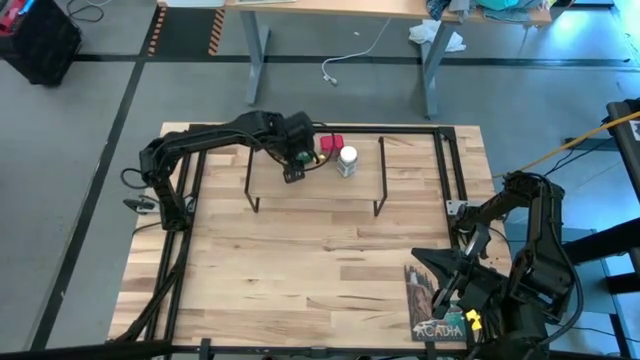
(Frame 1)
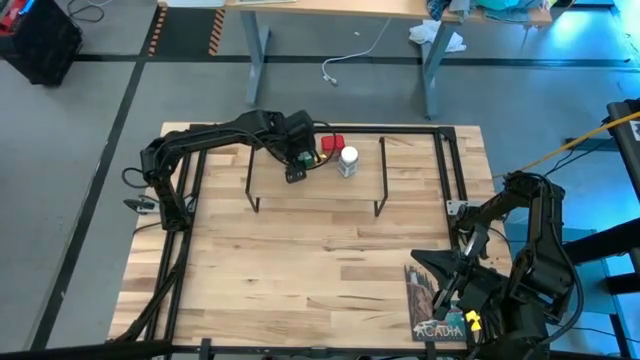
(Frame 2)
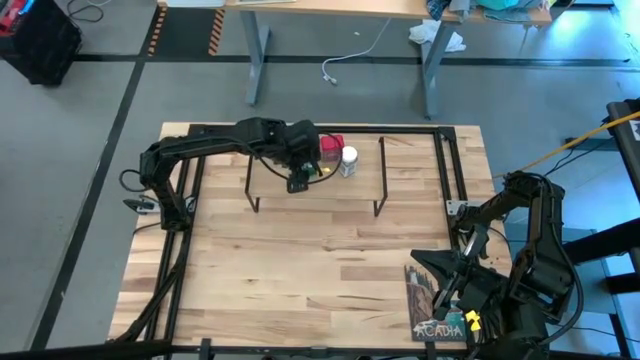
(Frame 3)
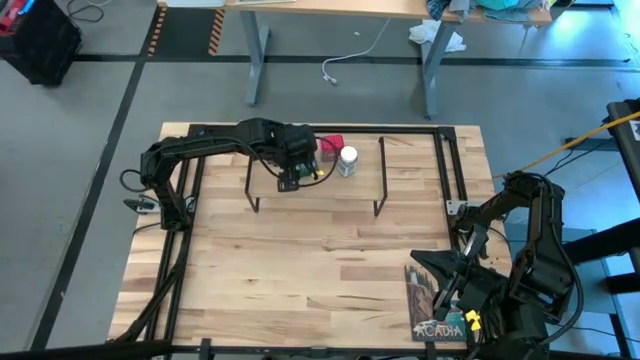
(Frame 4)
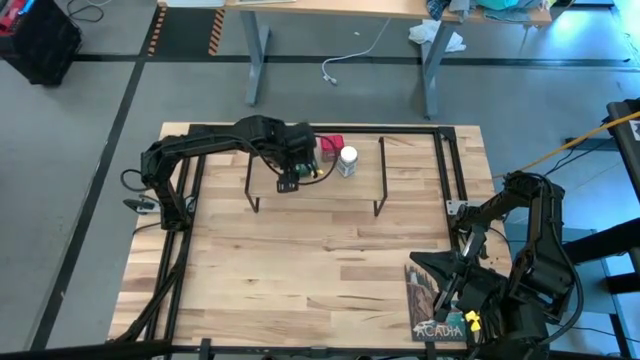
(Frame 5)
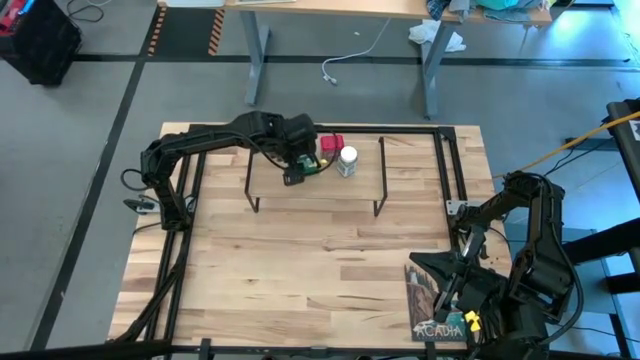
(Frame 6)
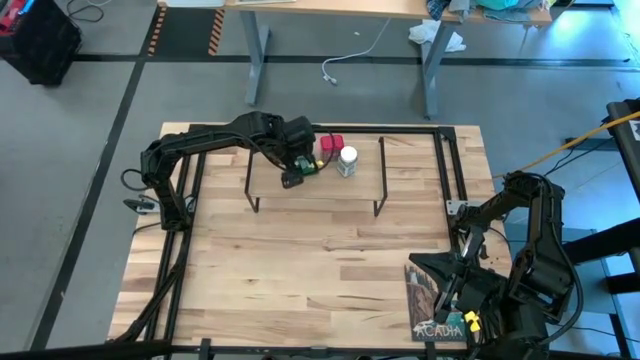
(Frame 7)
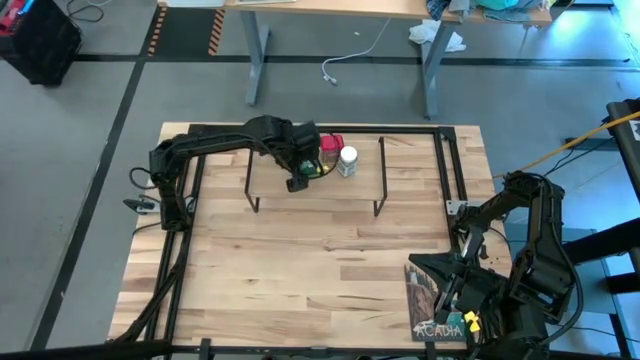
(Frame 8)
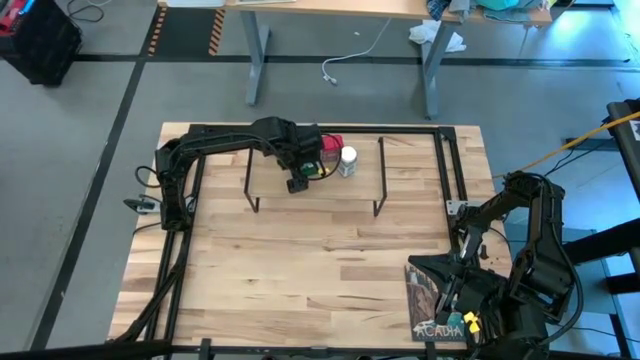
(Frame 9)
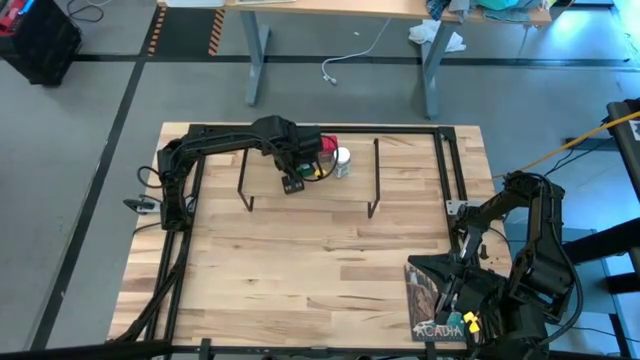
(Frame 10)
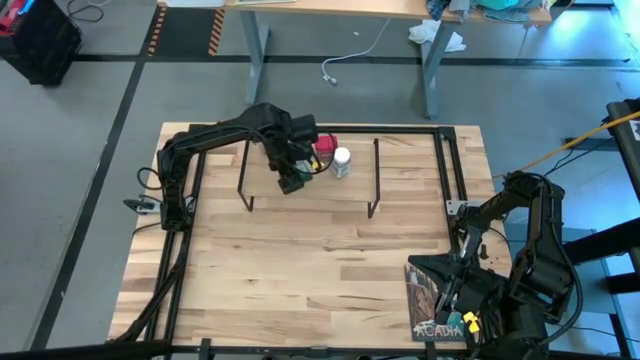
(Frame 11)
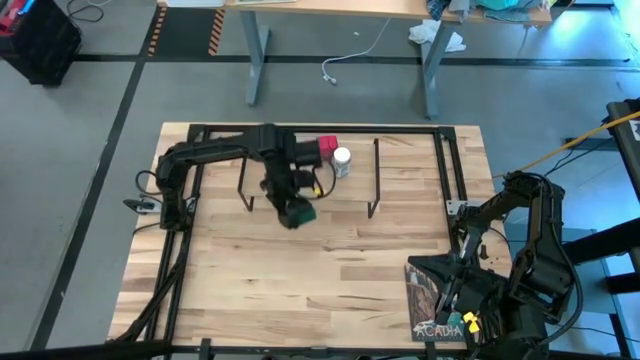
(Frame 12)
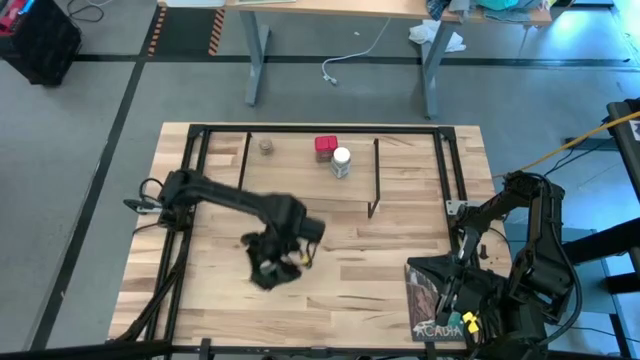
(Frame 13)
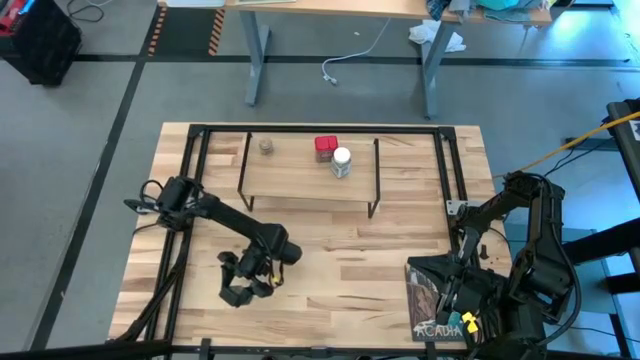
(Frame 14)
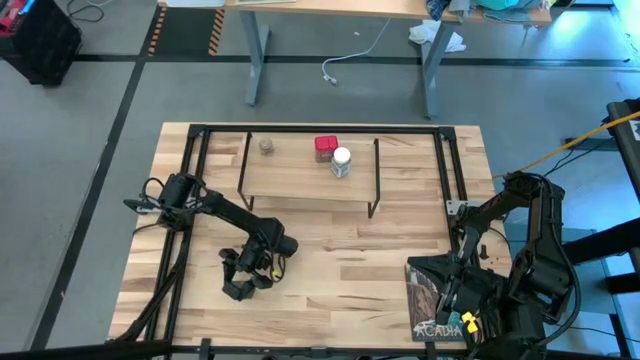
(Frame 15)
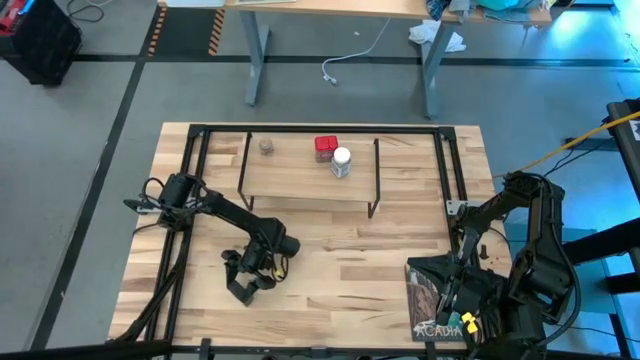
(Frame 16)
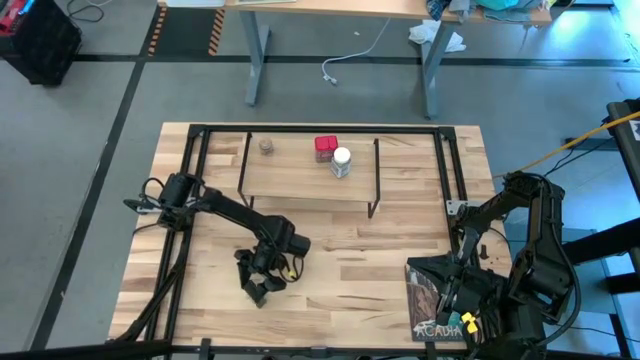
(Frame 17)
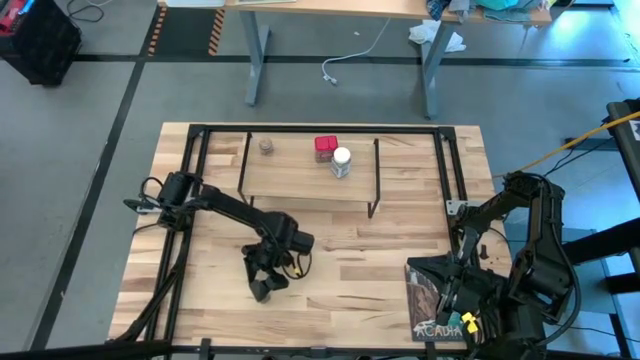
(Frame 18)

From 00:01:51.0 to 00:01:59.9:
Task: Shelf spices
Remove the green seasoning can from the shelf

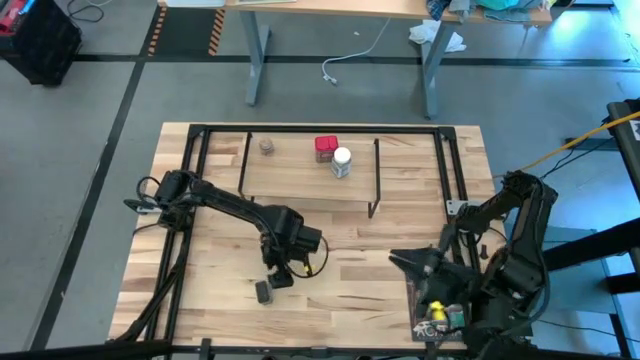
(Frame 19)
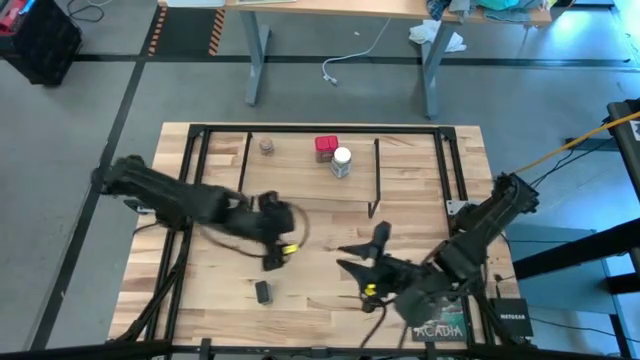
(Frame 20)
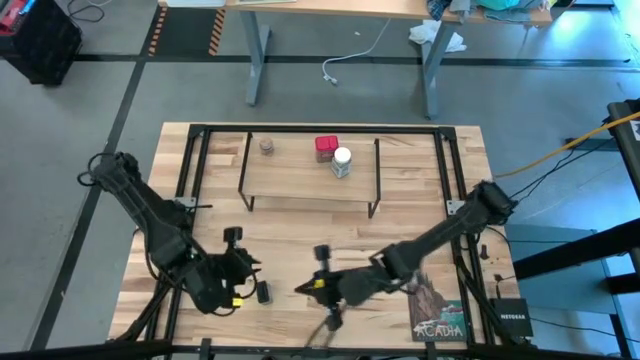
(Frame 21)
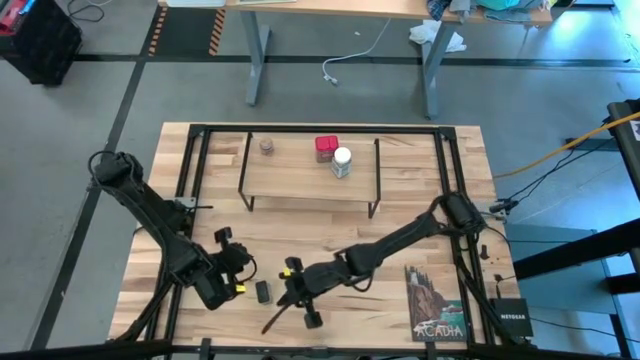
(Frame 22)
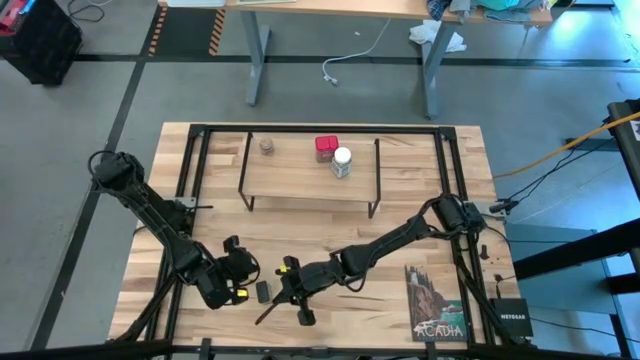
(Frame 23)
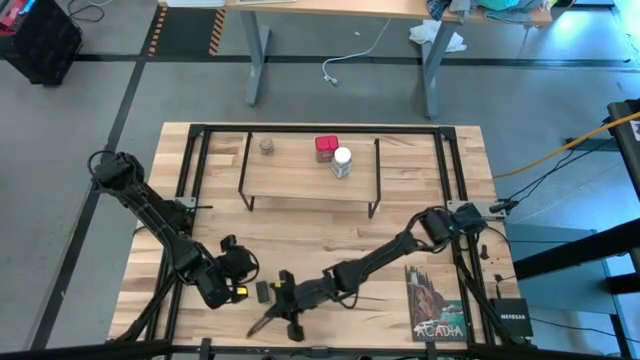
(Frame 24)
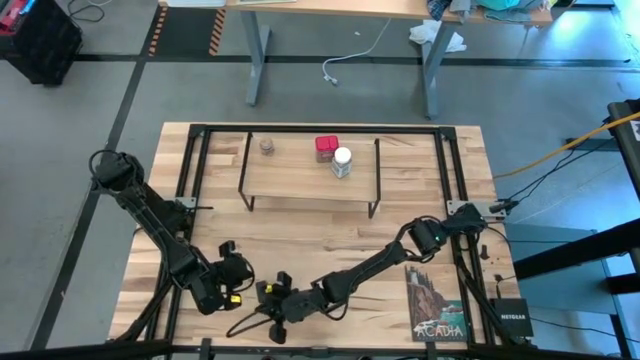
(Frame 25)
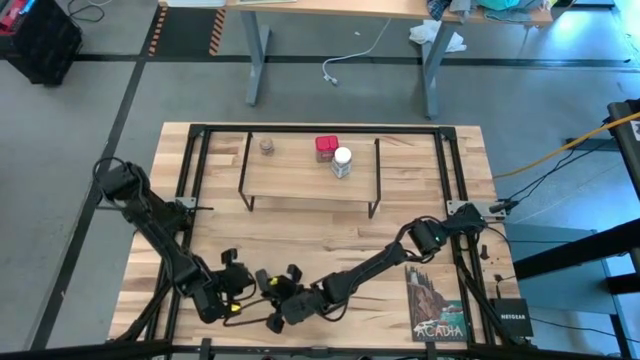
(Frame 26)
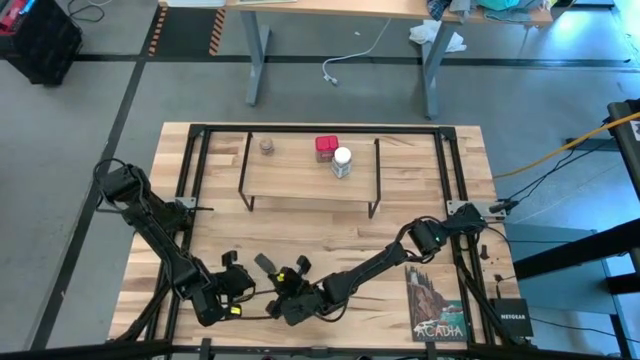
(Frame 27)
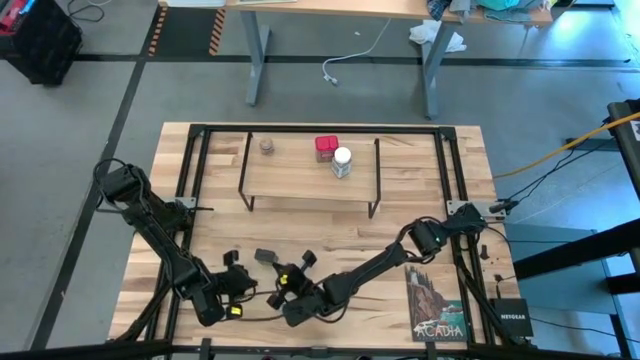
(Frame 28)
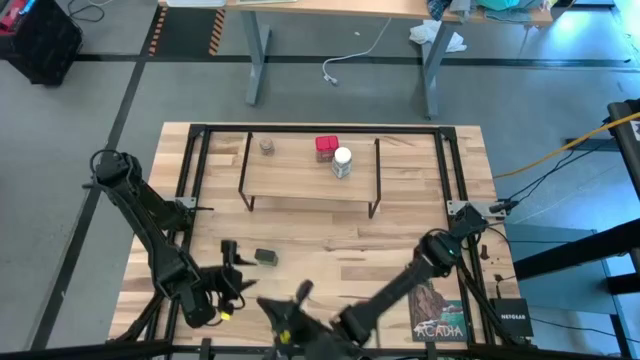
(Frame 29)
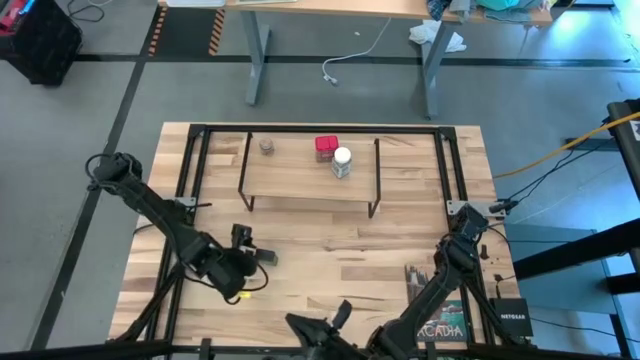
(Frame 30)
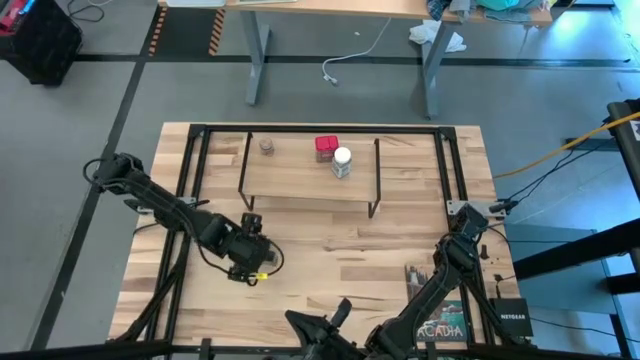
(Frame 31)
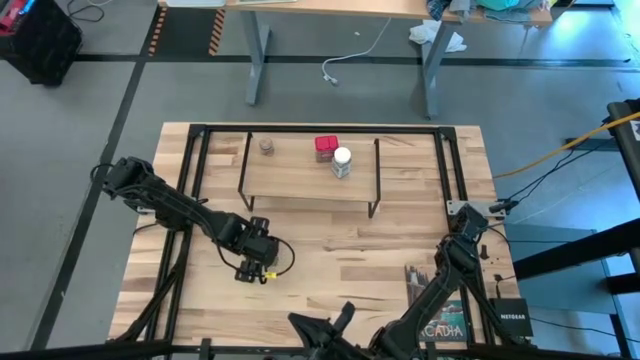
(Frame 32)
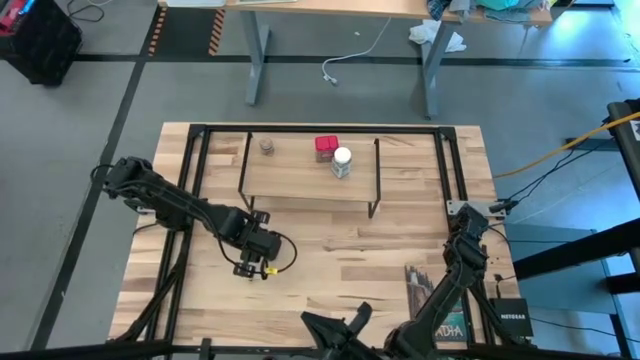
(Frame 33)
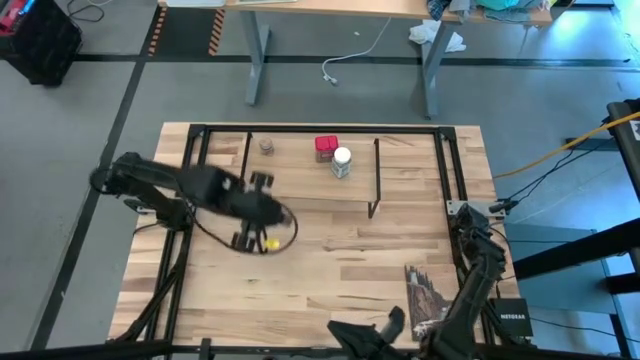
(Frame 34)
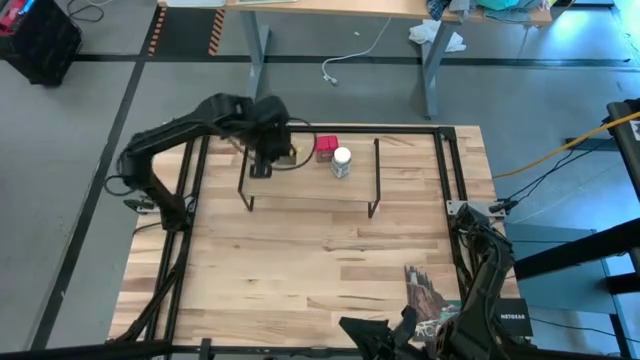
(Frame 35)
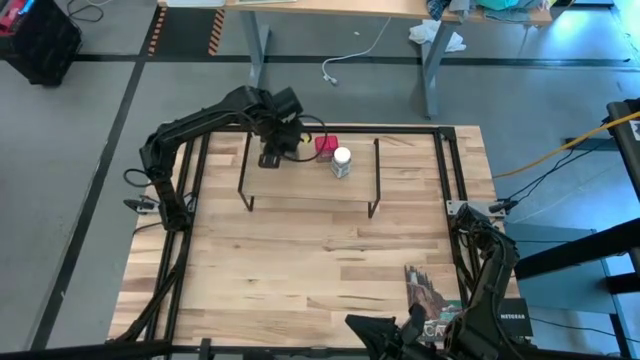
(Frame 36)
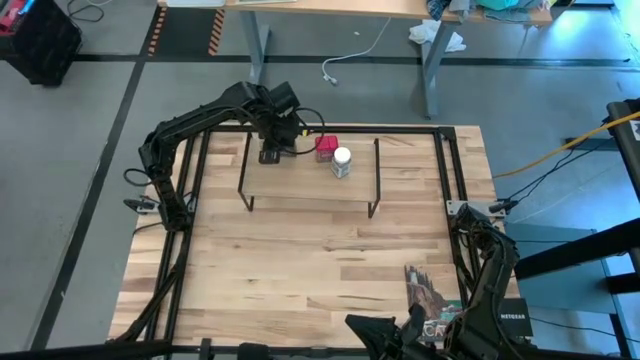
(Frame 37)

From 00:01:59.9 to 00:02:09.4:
Put the green seasoning can on the shelf

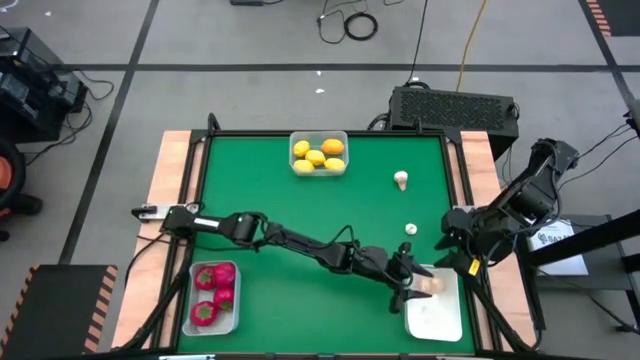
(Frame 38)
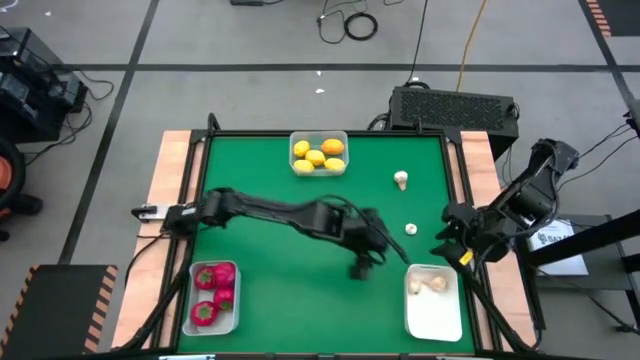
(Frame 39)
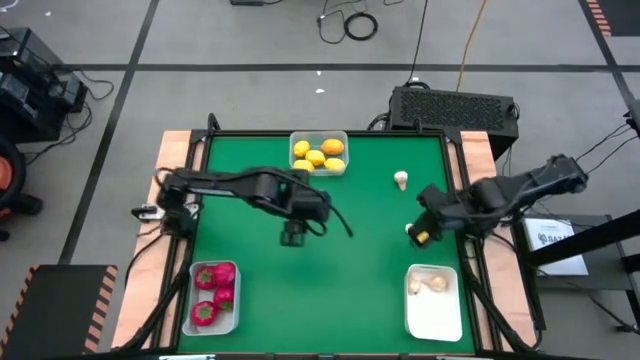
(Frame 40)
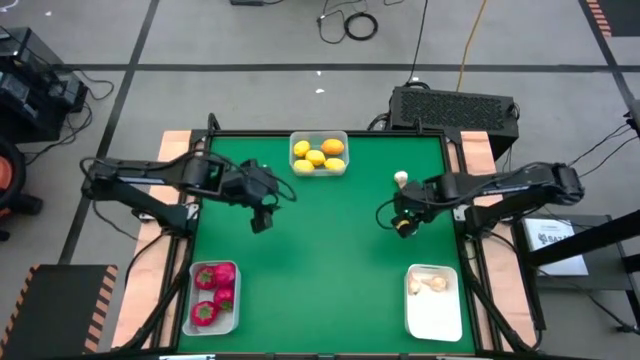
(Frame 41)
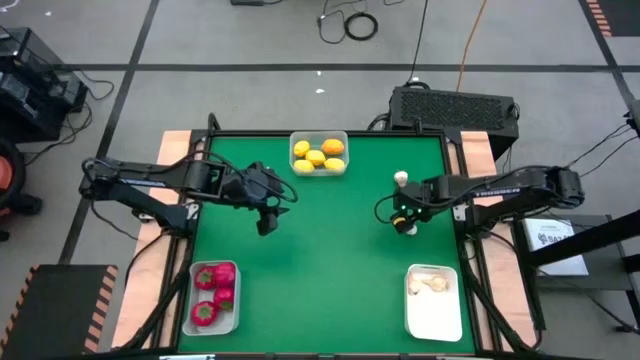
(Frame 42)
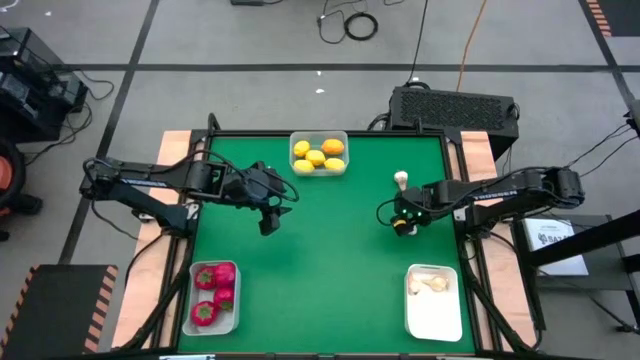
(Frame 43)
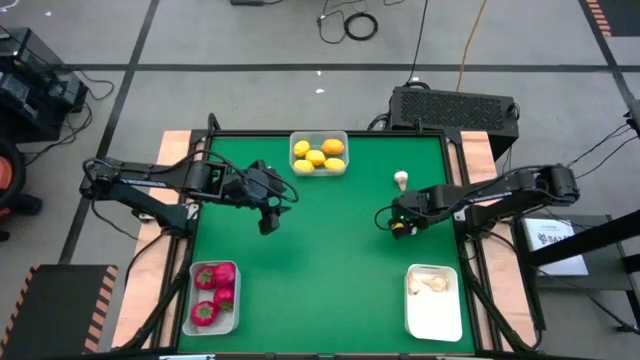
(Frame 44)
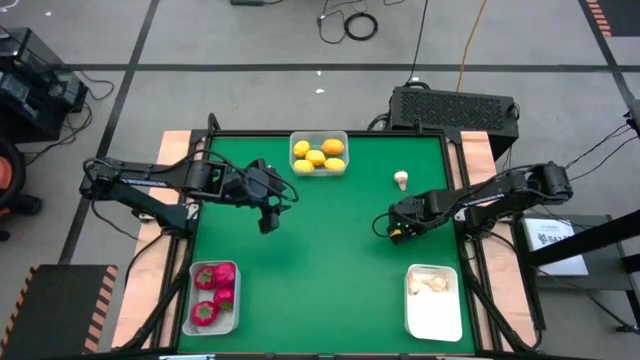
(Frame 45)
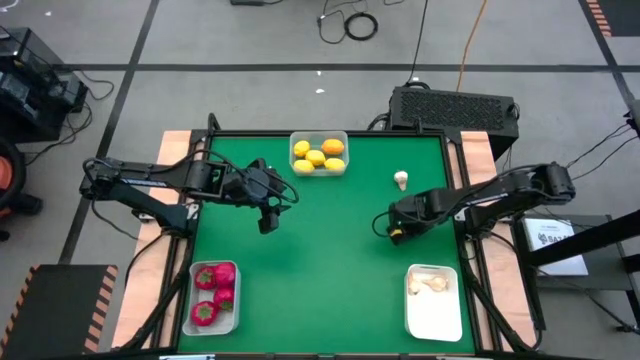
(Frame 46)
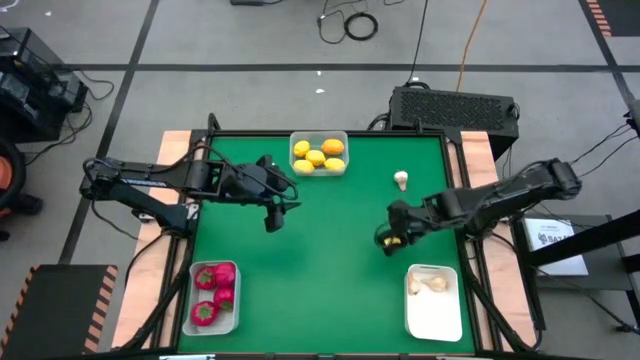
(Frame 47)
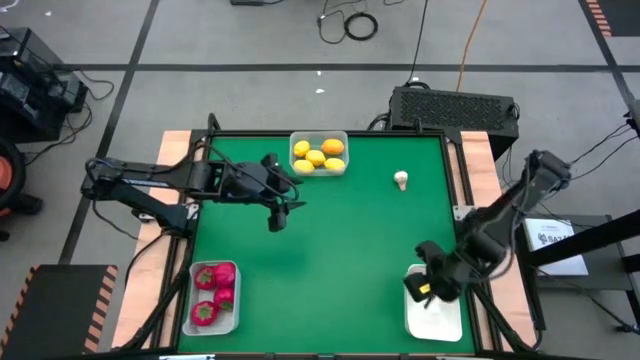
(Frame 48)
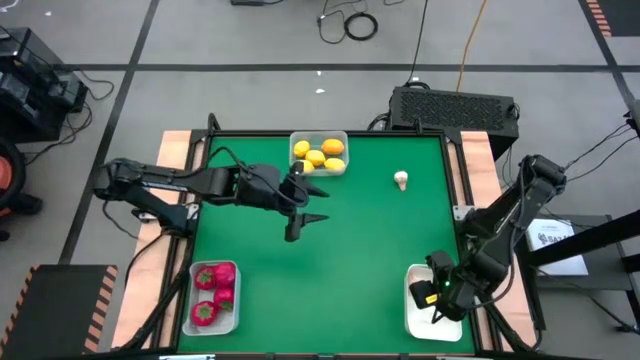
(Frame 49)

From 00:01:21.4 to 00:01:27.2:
Task: Sort produce into baskets
Put the garlic into the white bin
